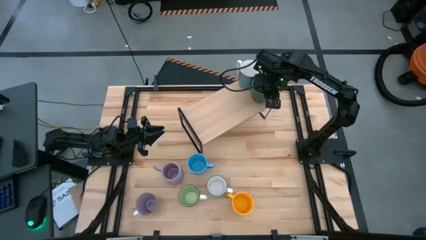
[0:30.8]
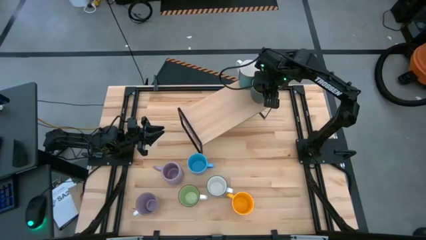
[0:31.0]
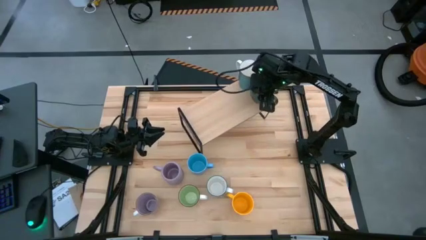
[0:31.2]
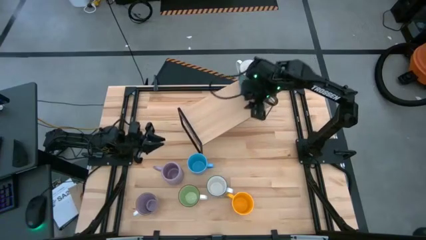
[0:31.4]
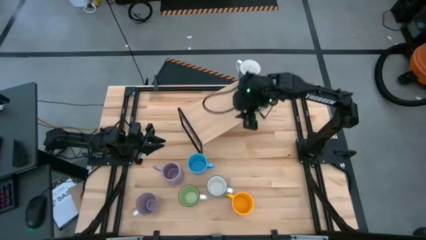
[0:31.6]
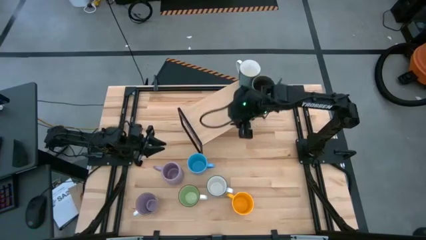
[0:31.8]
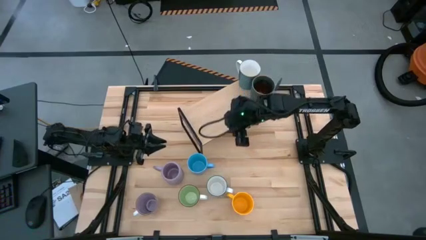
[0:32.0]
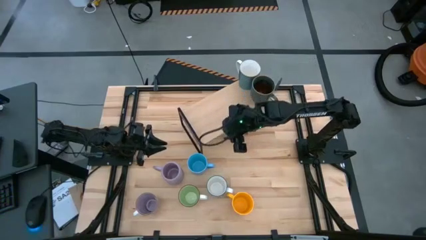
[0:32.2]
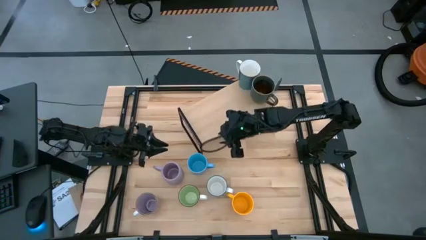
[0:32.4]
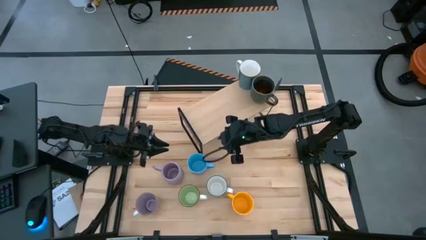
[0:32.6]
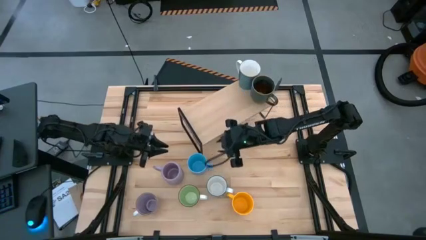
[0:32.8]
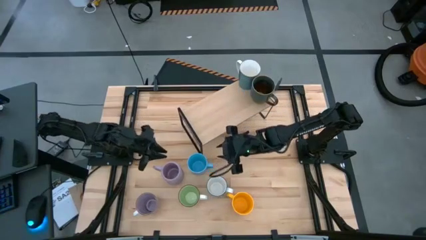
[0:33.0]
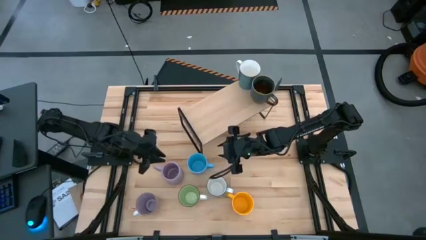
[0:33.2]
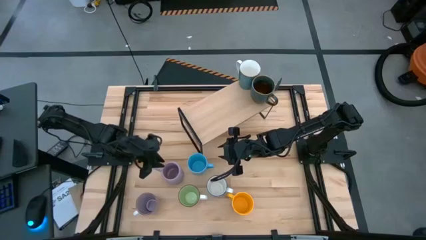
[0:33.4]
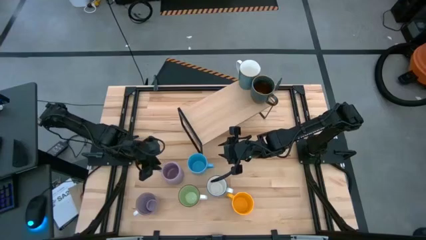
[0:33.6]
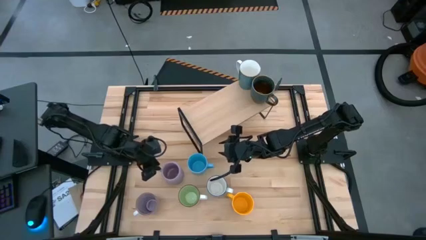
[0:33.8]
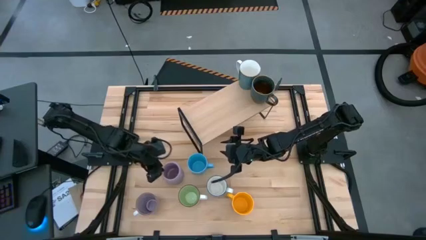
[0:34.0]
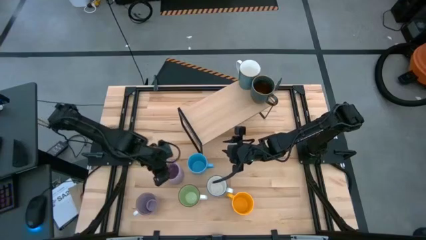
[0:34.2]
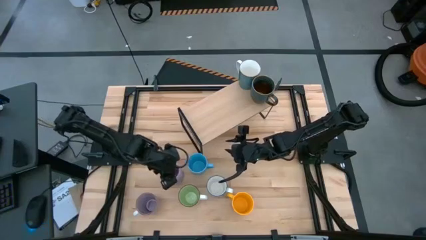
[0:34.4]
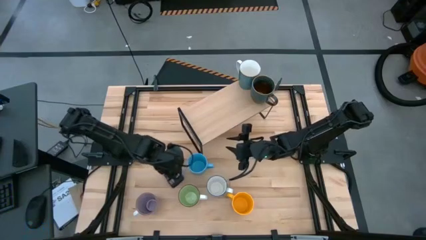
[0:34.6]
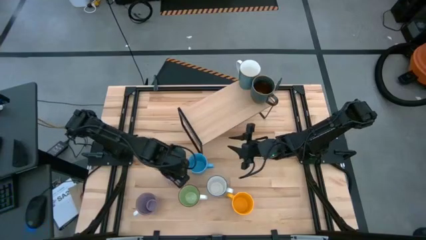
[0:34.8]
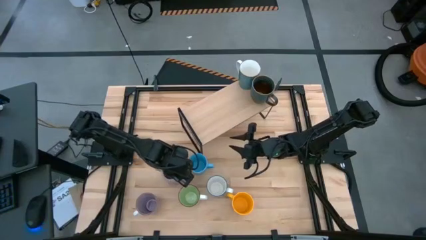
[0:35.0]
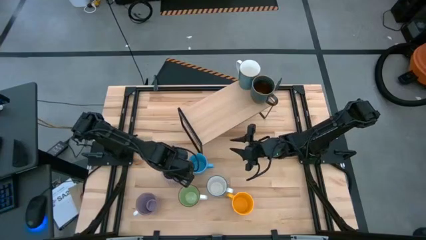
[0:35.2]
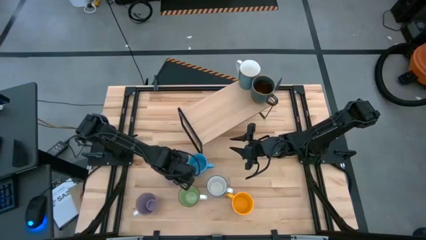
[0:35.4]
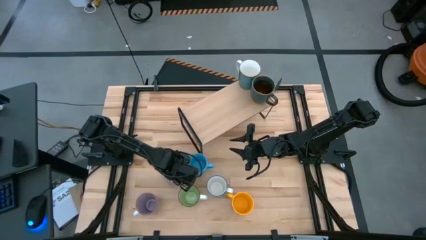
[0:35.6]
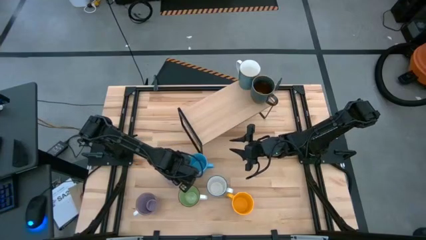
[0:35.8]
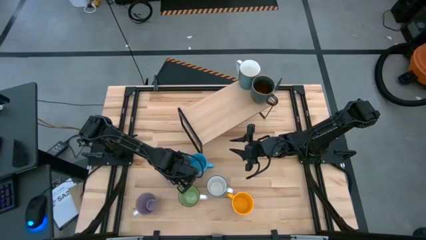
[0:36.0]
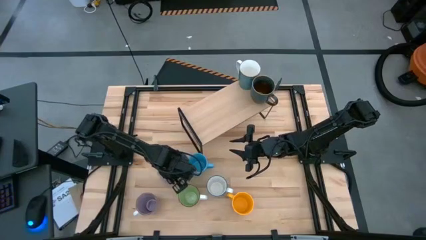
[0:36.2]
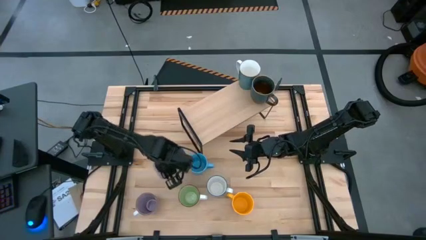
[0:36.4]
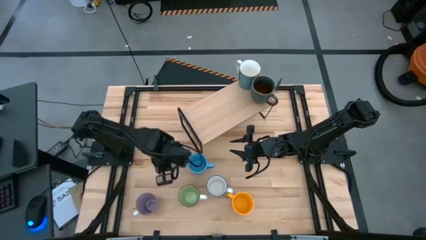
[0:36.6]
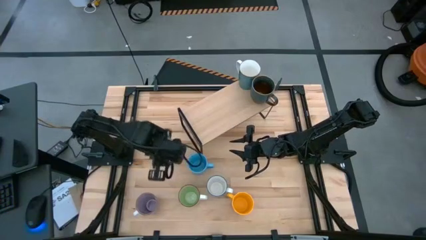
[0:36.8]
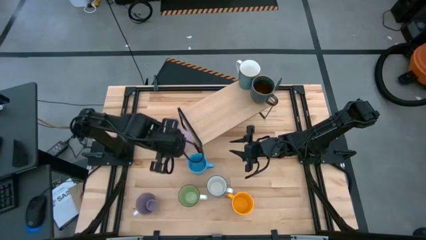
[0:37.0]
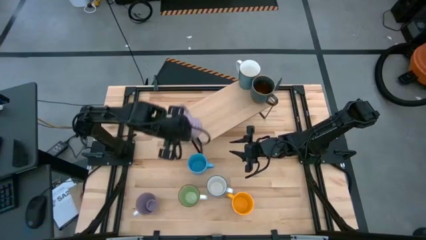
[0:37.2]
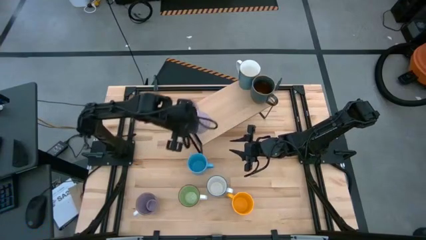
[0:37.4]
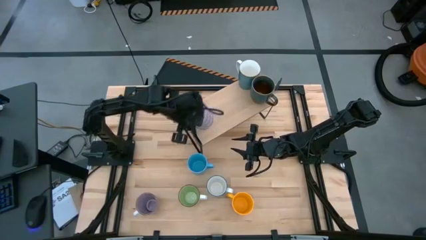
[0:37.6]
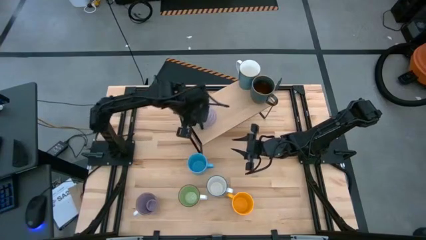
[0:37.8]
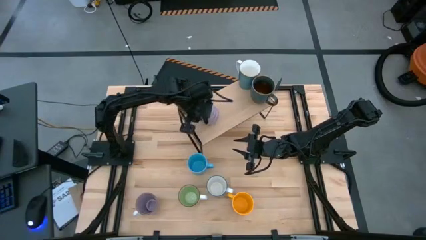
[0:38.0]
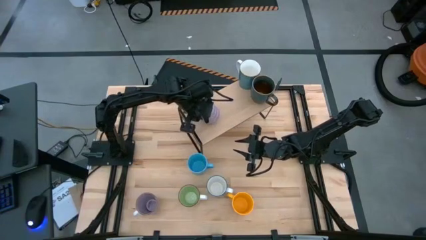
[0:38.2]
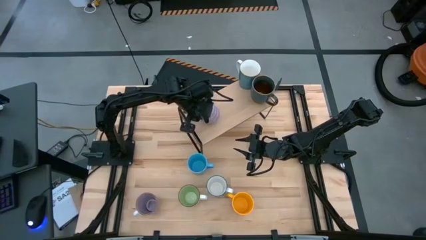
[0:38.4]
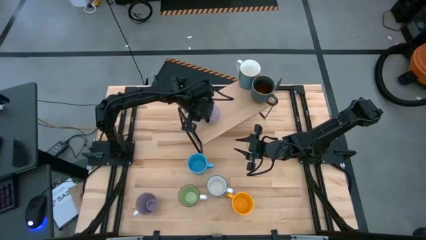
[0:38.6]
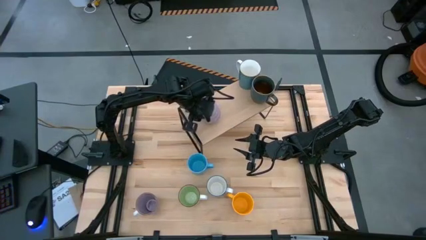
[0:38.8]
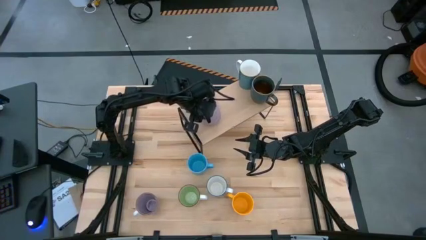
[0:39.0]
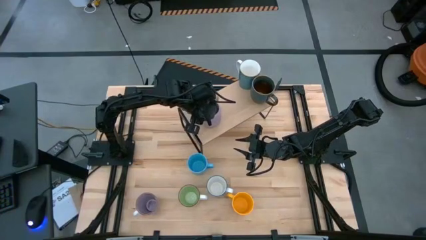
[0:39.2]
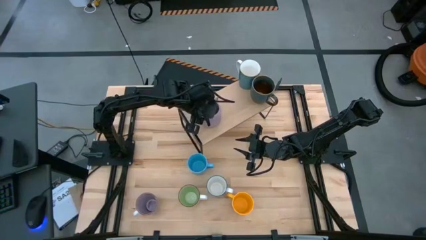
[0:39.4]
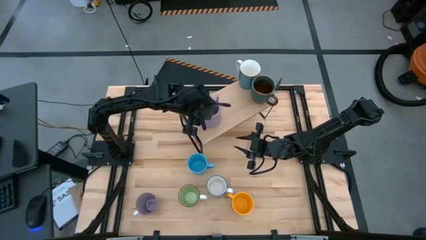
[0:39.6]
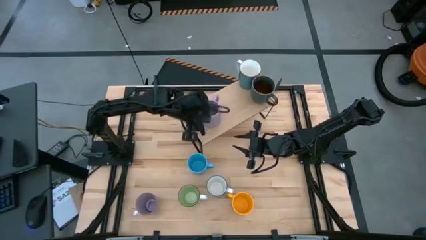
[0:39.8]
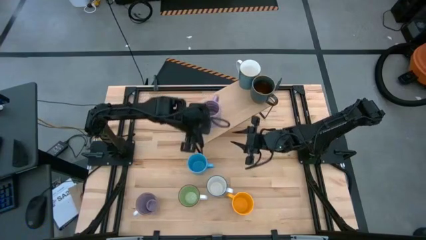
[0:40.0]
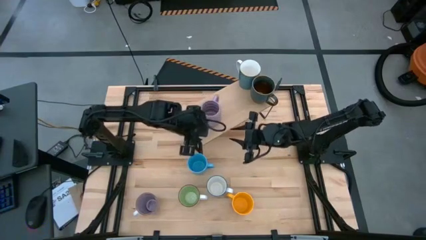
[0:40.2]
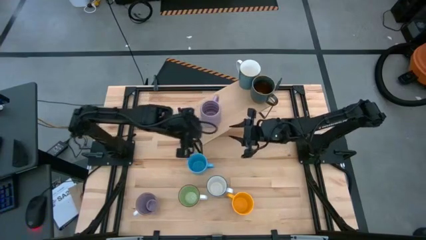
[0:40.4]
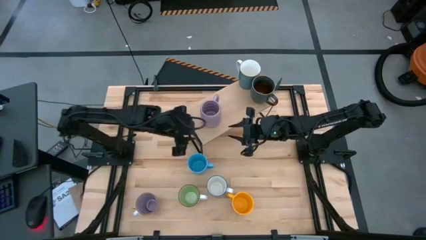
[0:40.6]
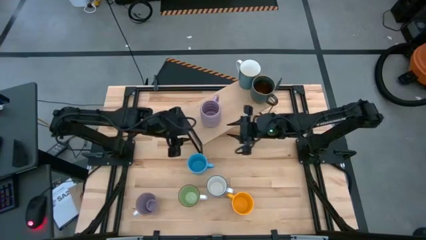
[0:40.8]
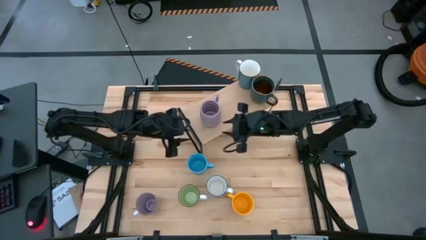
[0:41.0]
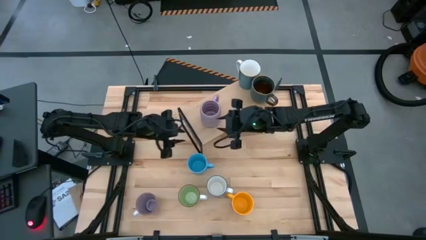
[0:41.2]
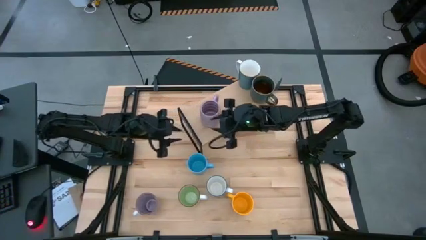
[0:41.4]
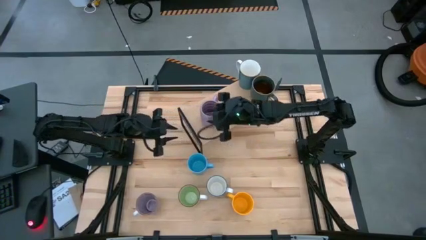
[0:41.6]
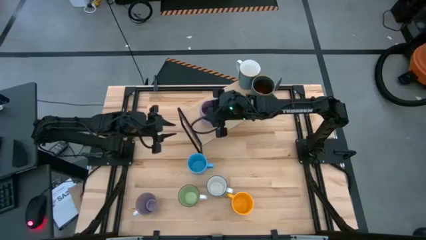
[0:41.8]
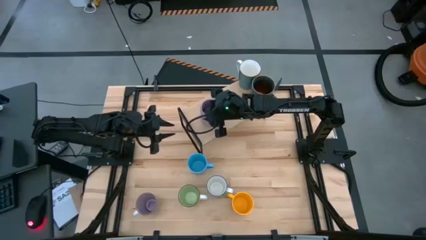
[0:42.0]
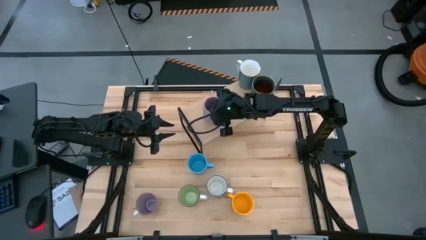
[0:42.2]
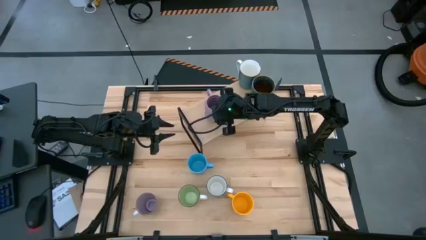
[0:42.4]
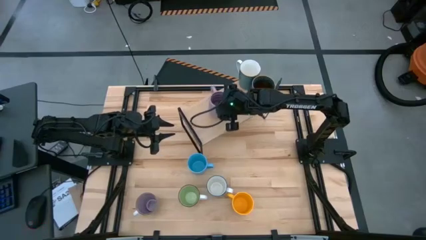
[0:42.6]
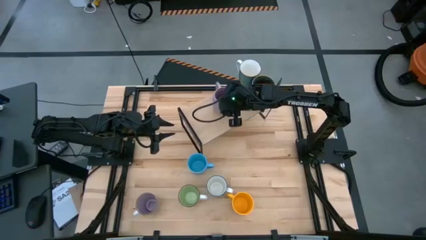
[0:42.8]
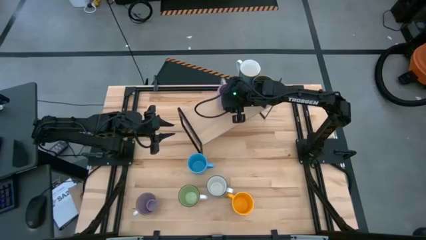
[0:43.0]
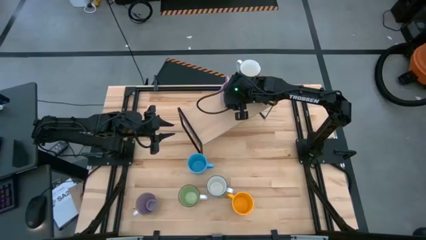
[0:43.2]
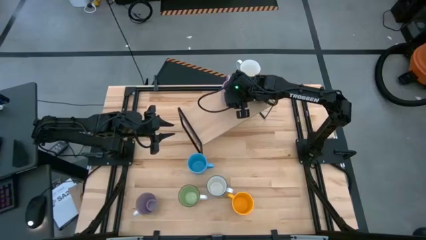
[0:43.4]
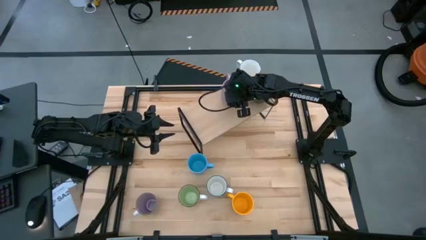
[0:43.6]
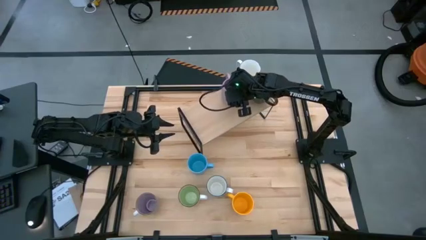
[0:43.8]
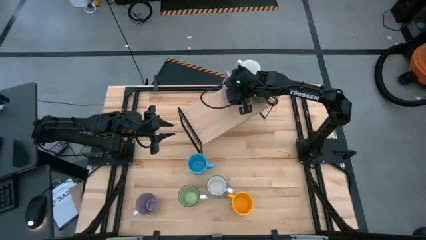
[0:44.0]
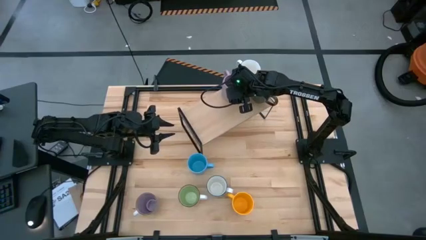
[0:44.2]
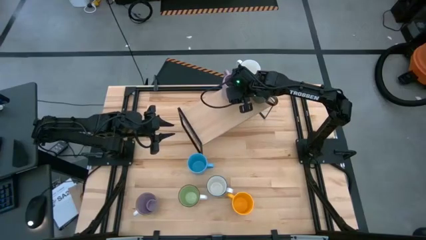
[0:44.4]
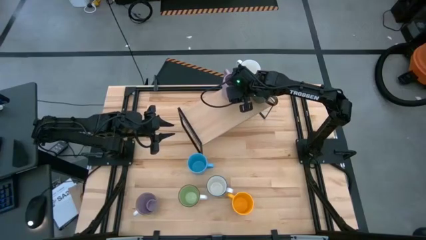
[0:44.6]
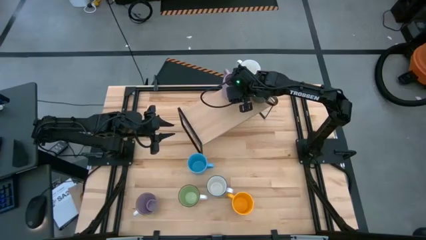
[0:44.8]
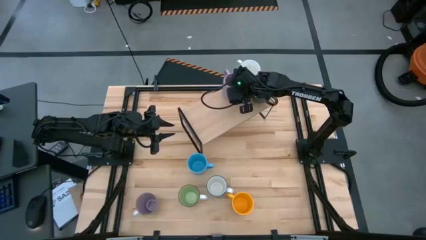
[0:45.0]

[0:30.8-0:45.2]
Task: Place coffee mugs
Put the purple mug on the shelf

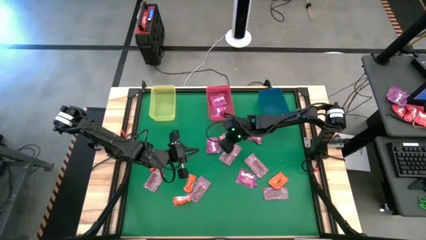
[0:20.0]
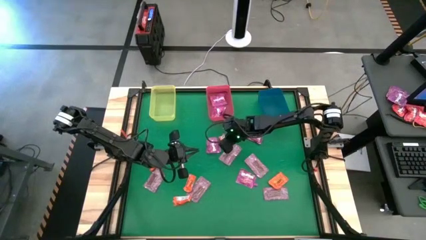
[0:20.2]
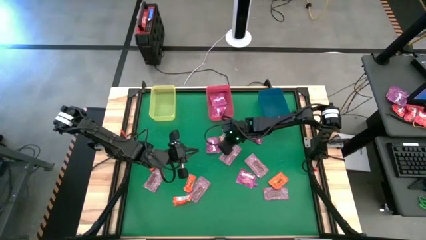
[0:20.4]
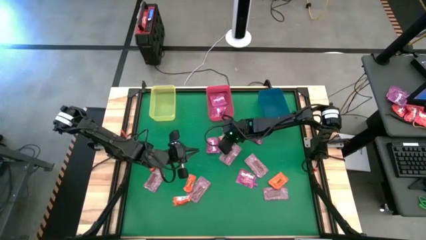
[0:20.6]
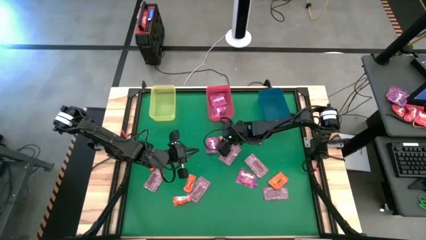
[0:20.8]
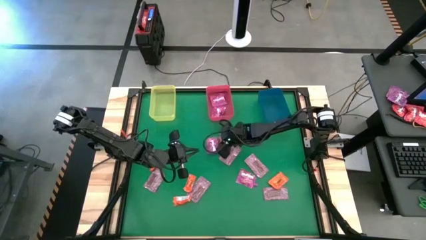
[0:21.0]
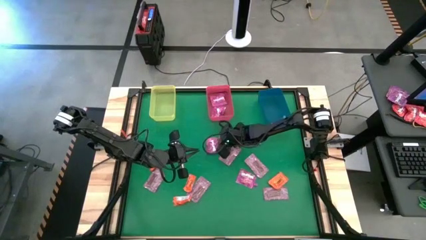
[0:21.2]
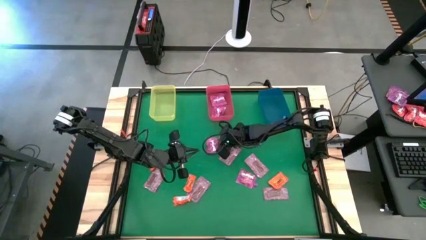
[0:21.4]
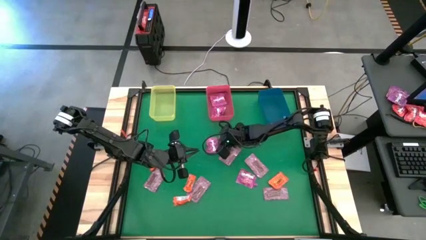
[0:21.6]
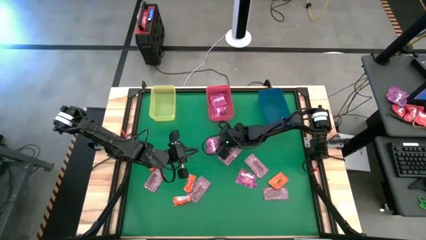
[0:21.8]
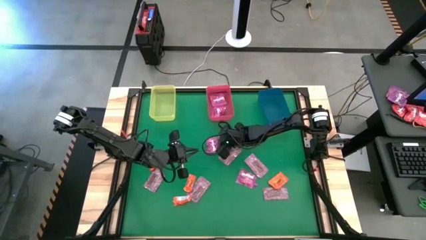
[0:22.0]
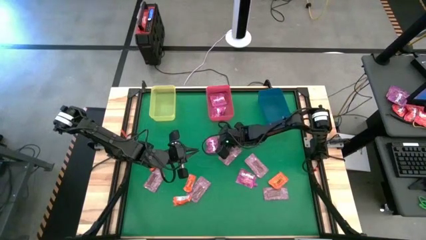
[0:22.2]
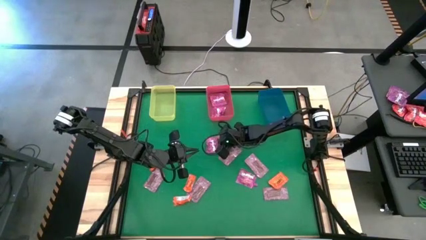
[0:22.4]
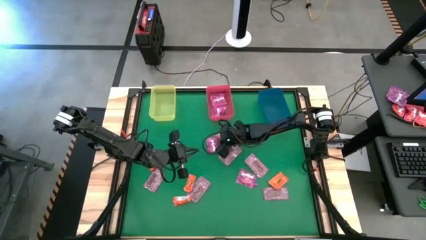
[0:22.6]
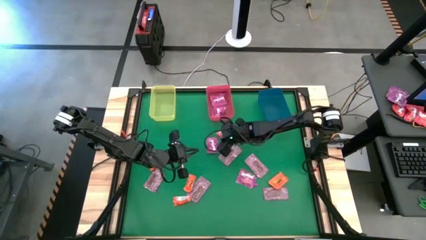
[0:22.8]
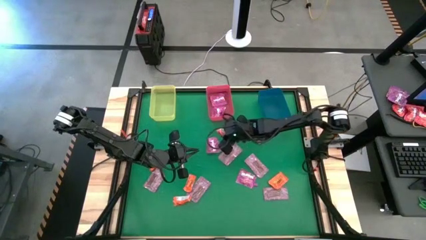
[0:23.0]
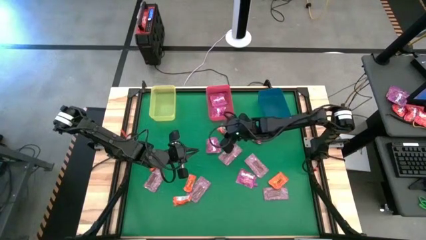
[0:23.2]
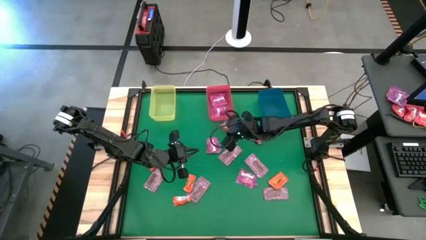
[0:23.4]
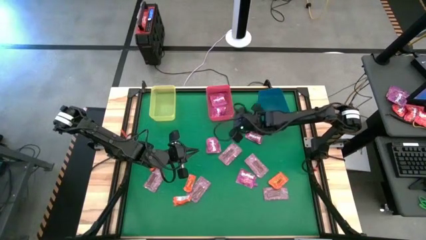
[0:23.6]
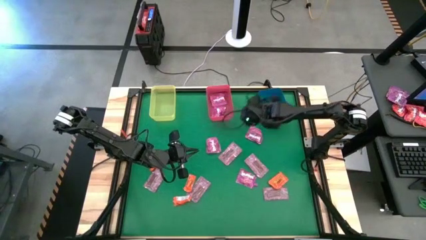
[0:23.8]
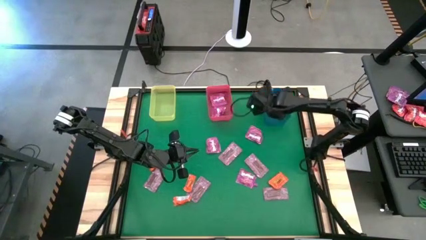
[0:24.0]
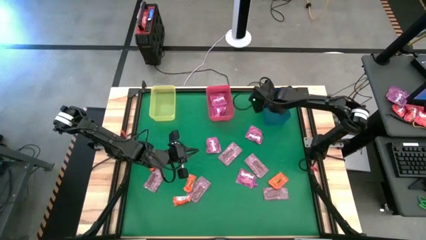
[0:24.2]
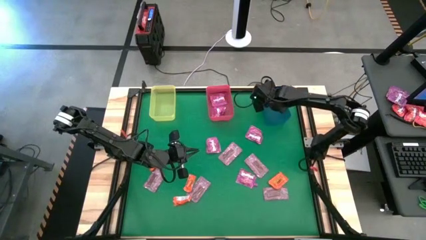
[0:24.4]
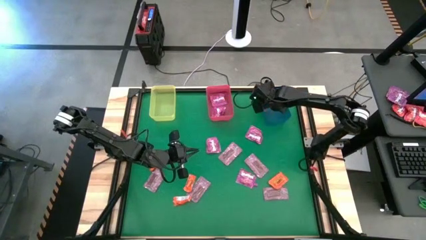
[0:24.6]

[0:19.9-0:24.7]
Task: Sort candy by brand, put in halloween buckets
Put the orange candy into the blue bin
